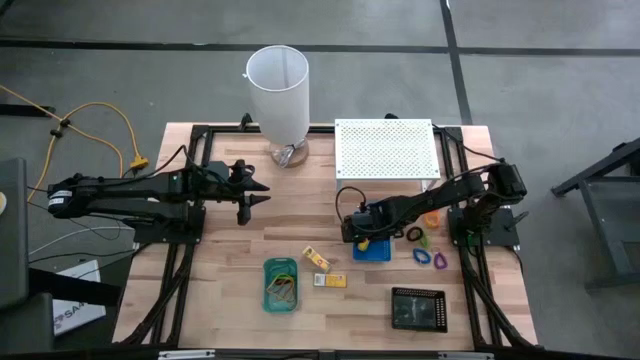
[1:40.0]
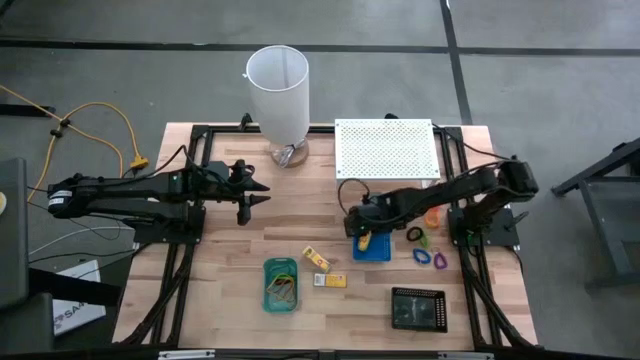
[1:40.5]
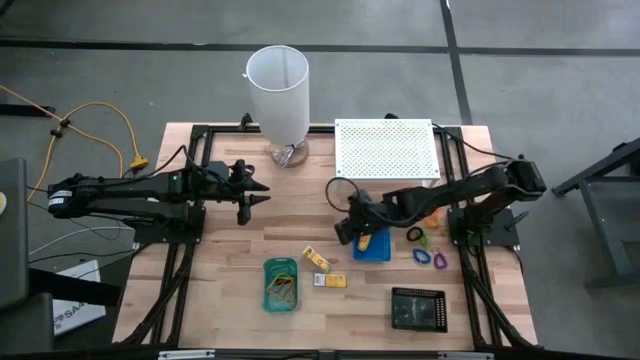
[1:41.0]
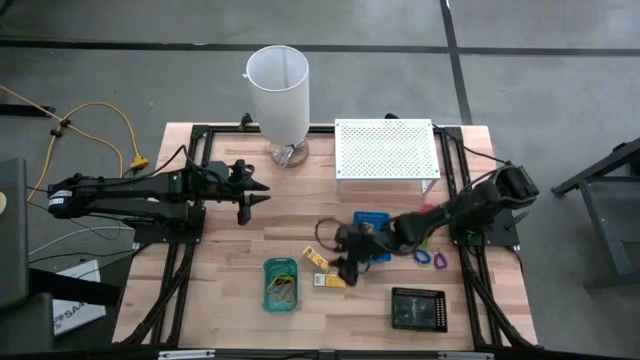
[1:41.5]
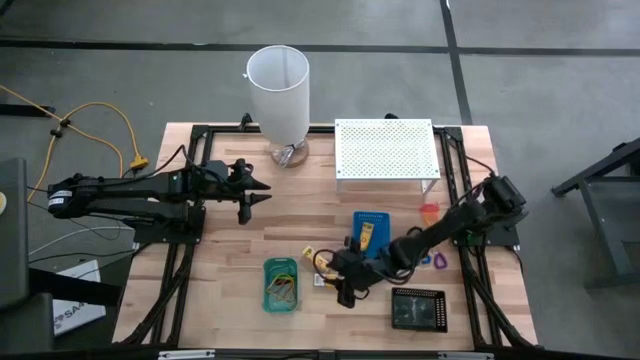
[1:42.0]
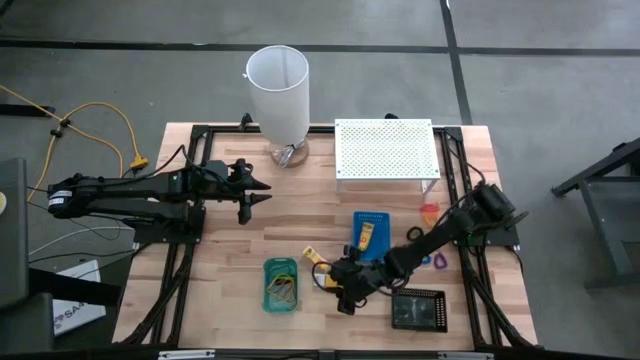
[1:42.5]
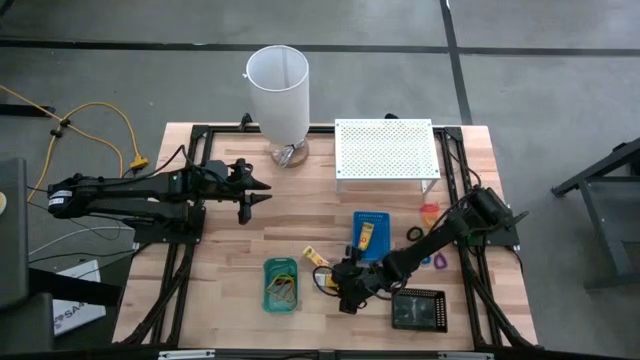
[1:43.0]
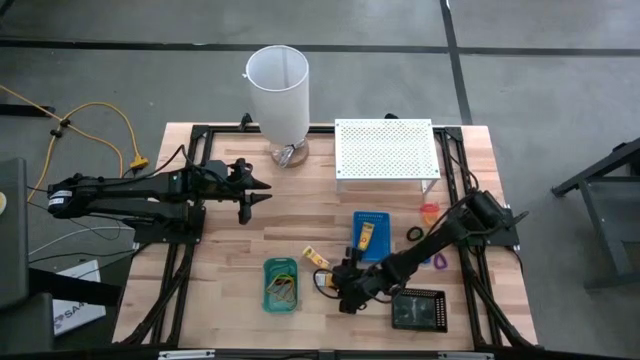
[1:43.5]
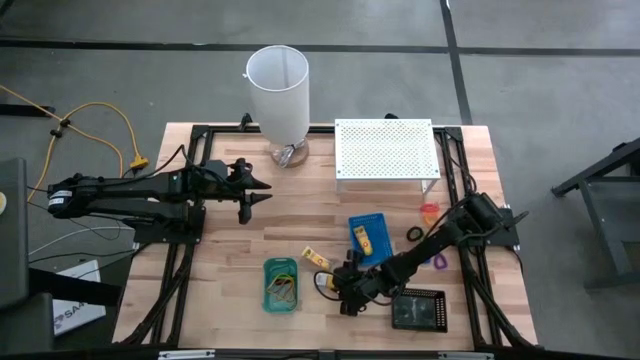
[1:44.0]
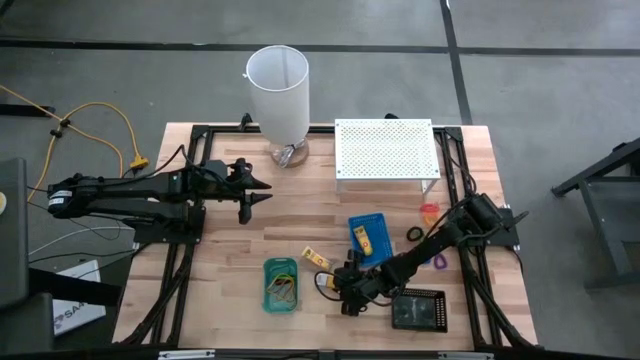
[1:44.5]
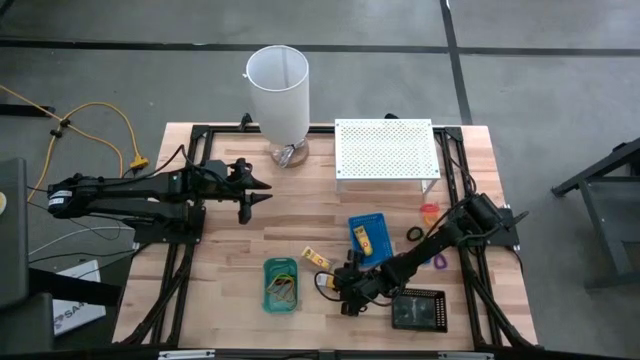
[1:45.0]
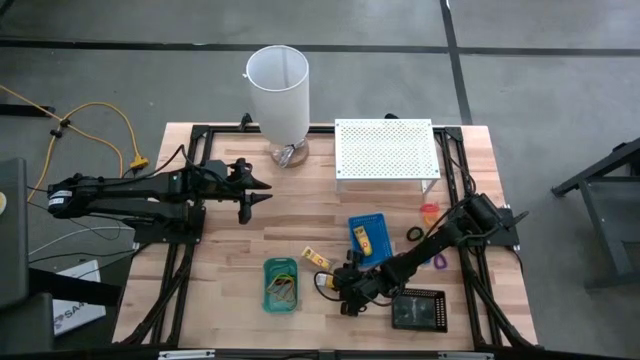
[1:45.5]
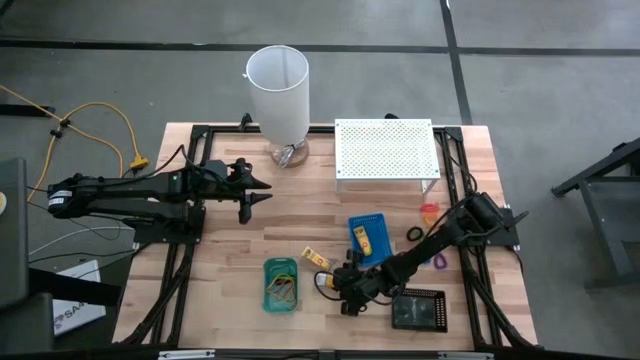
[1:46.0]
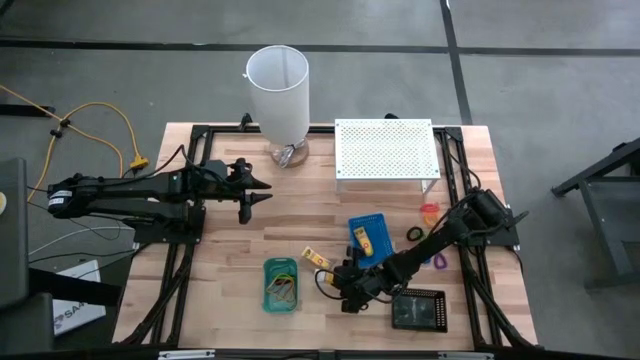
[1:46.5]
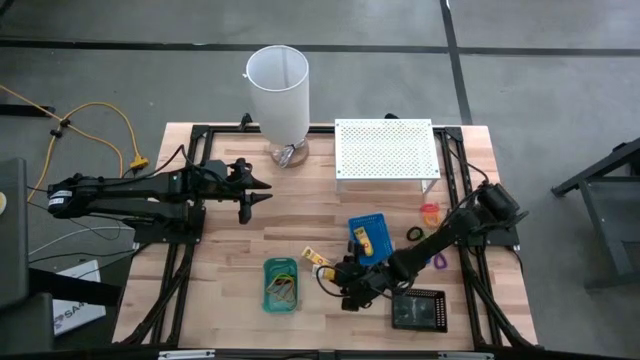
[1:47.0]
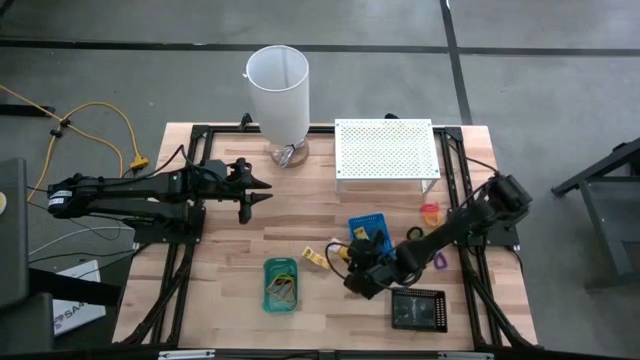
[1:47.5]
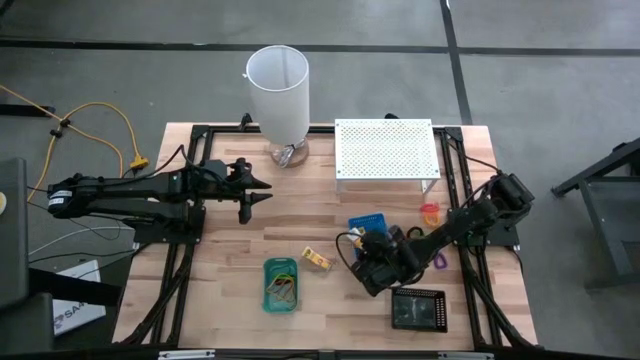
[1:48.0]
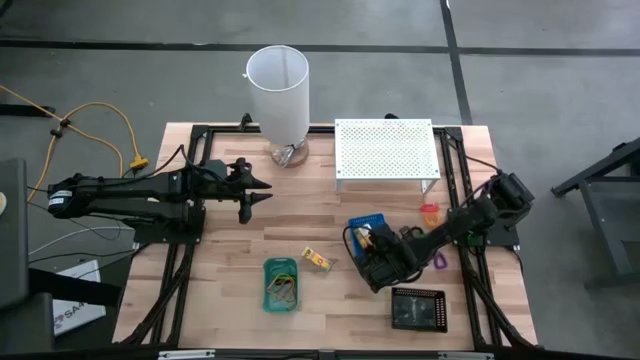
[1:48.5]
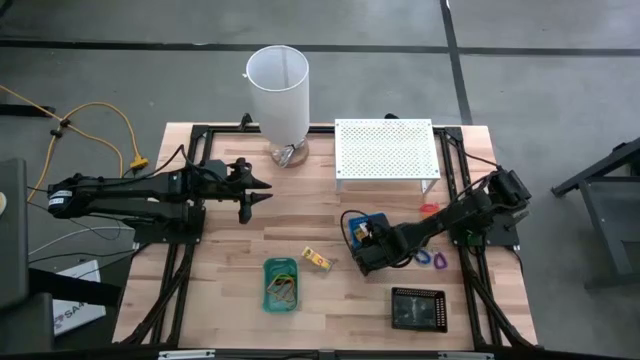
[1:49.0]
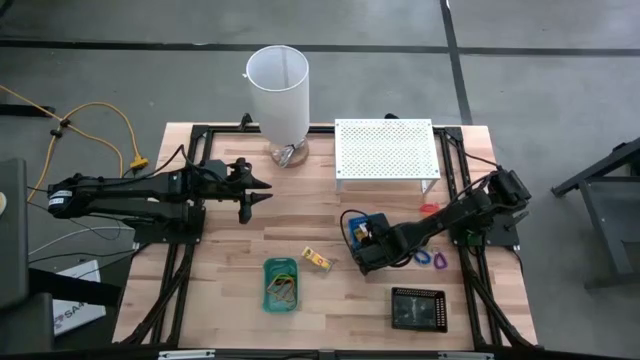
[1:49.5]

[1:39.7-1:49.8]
Task: Pick & Place Office Desk Supplies
Put the bottom crayon box into the blue bin

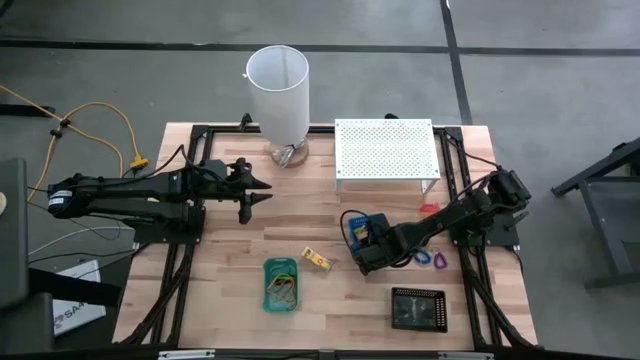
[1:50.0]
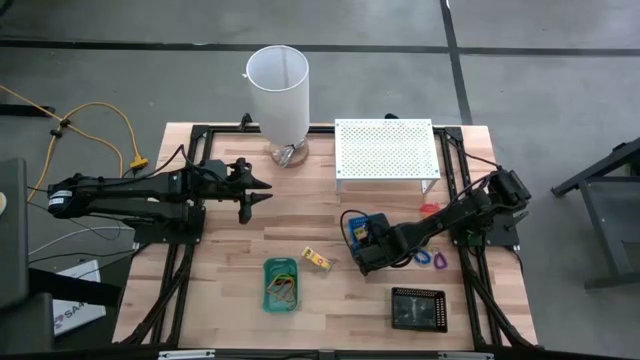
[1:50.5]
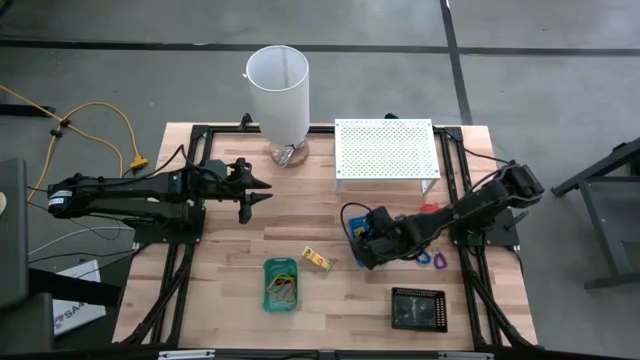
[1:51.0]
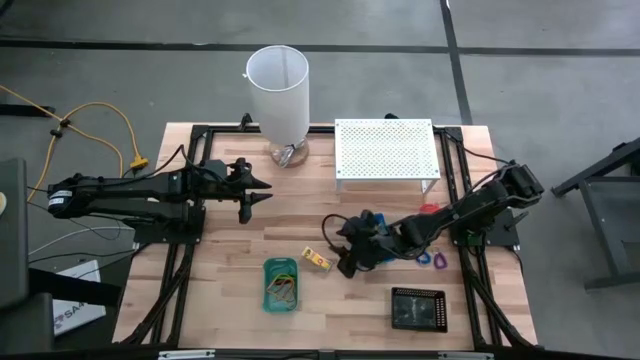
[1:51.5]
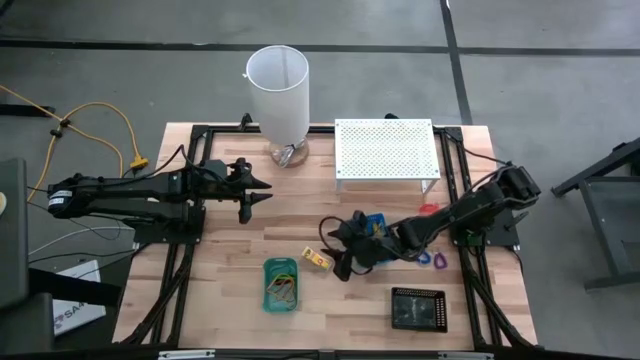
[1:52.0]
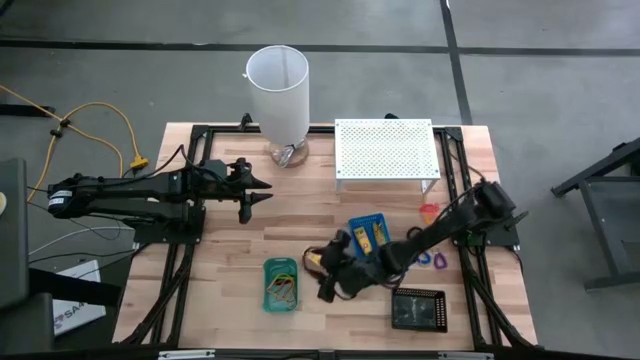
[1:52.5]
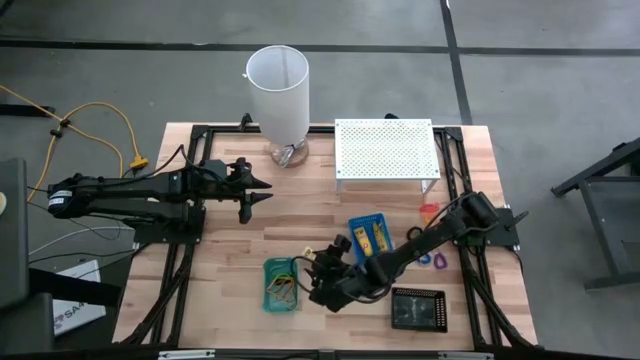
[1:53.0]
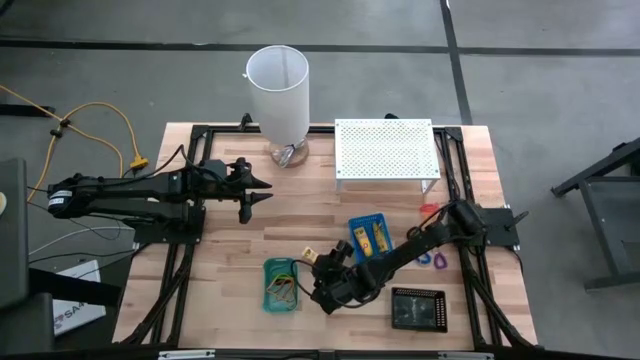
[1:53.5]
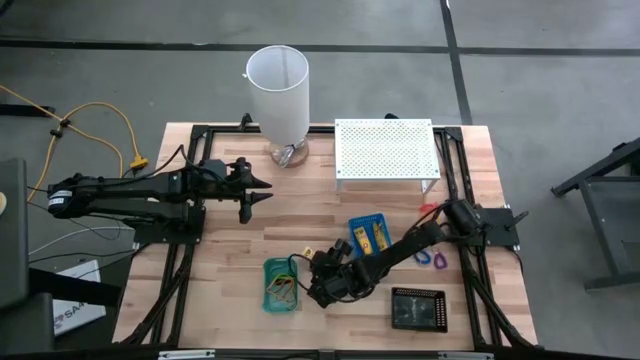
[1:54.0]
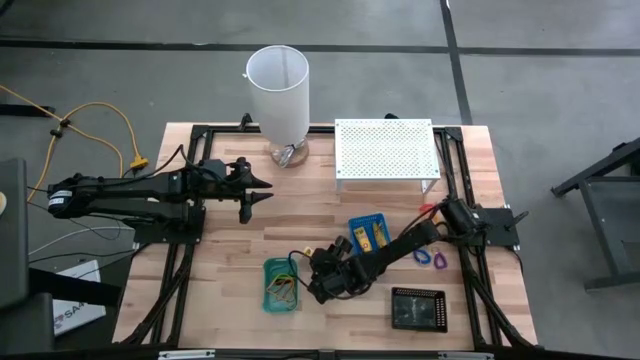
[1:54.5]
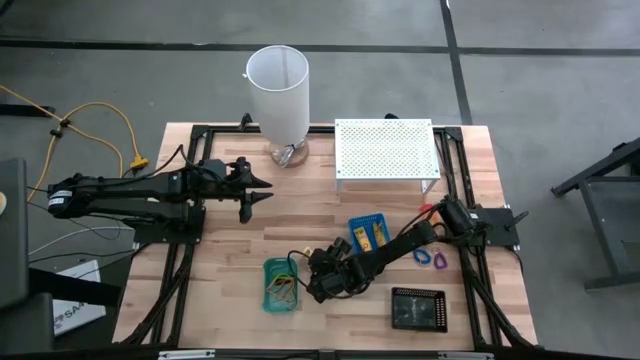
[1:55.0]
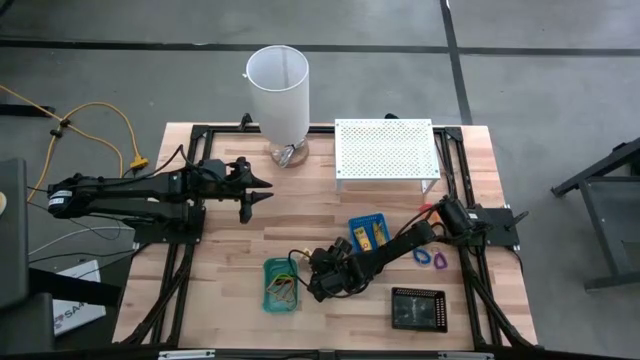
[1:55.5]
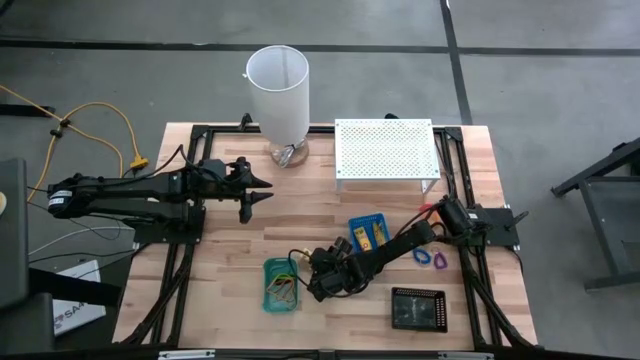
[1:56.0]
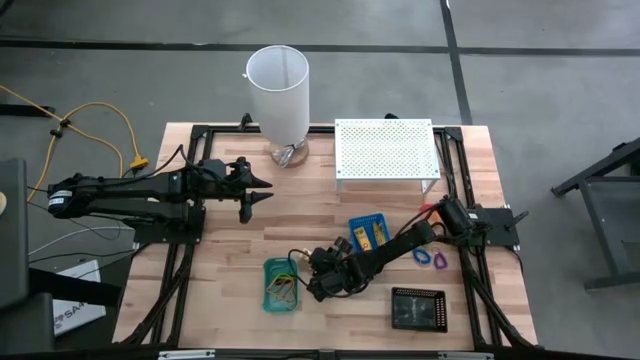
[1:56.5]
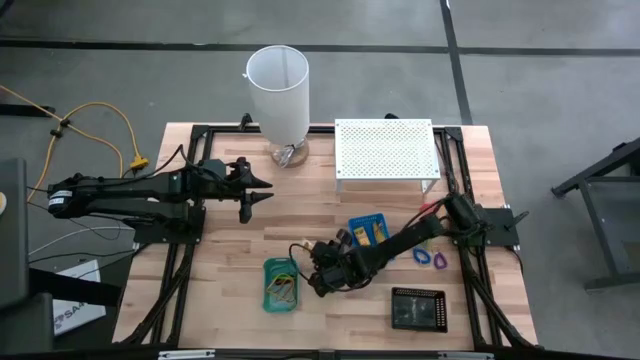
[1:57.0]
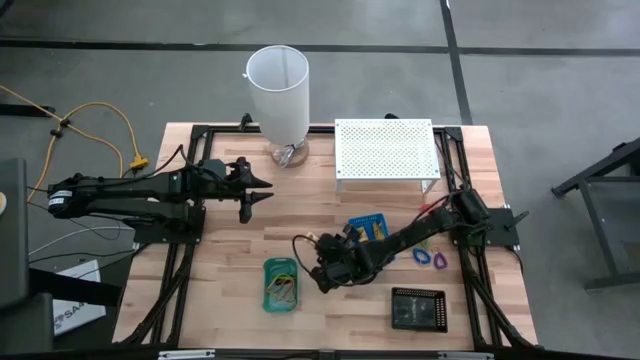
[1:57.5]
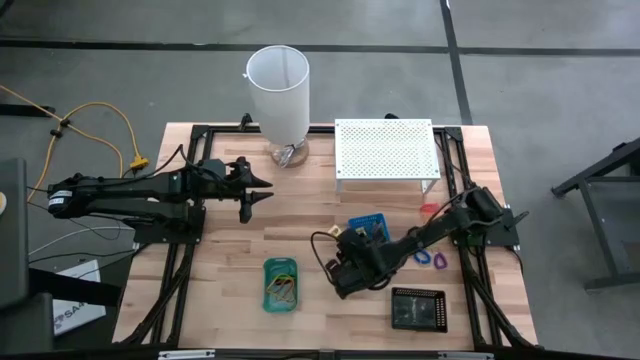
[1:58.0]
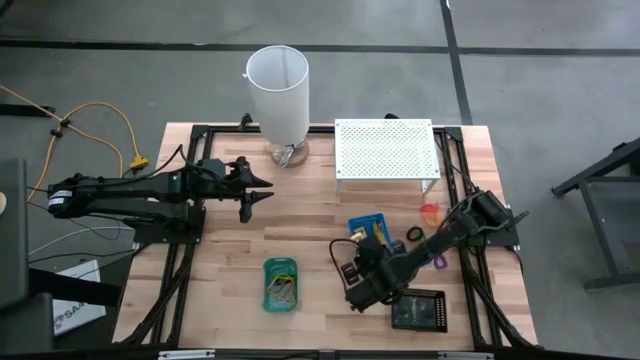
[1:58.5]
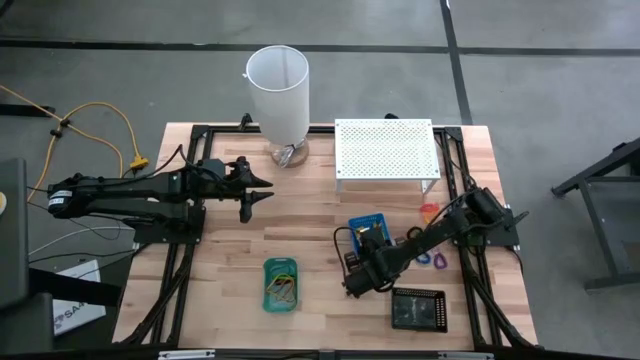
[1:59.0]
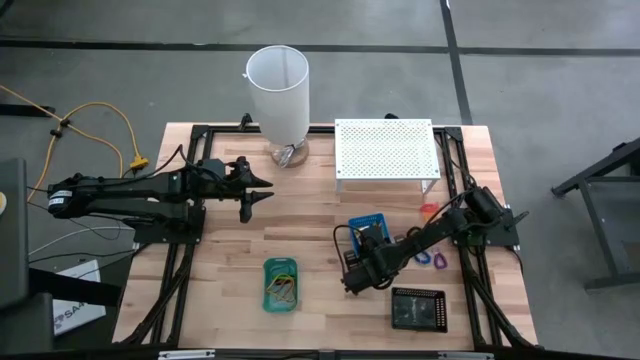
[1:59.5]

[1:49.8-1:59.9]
Put the crayon box into the blue bin

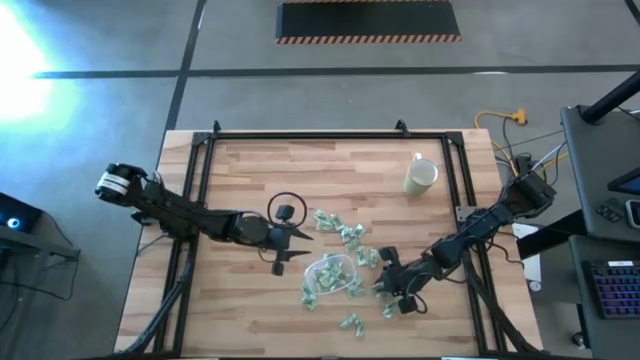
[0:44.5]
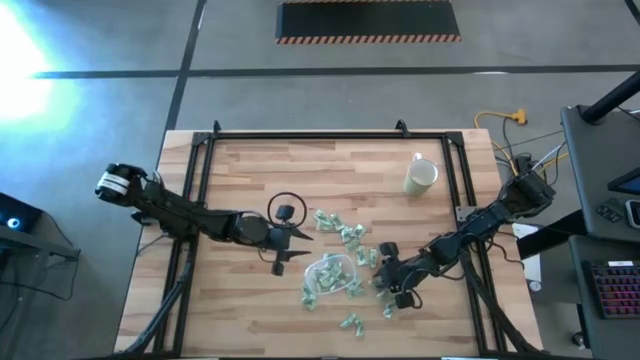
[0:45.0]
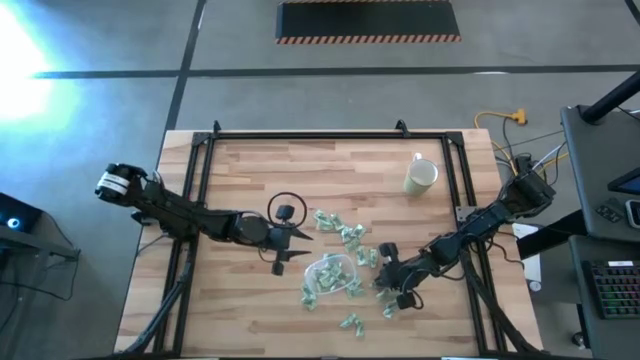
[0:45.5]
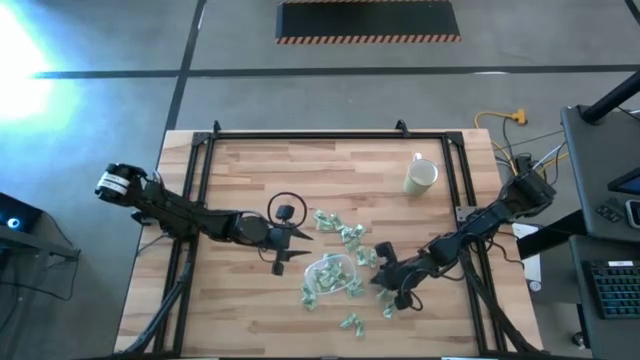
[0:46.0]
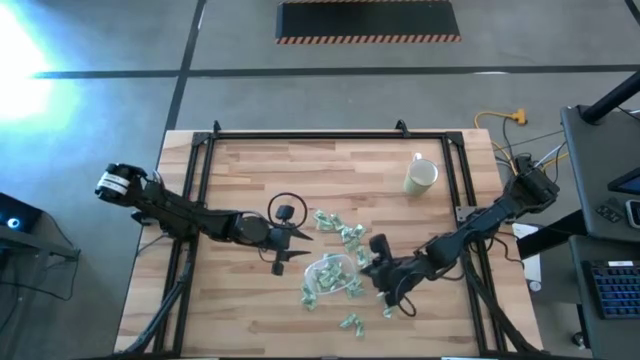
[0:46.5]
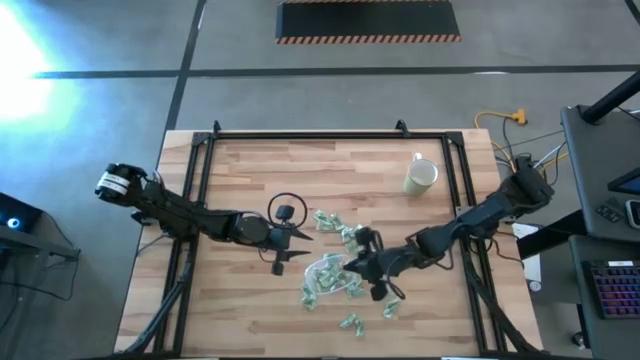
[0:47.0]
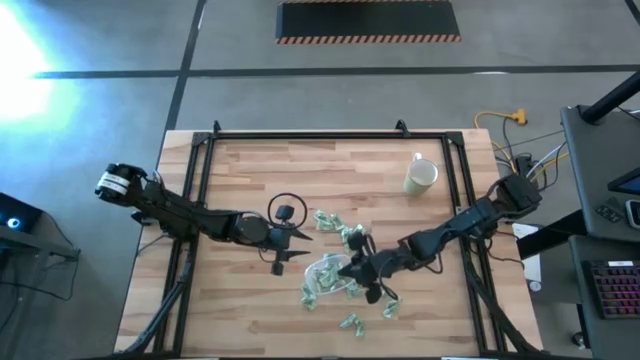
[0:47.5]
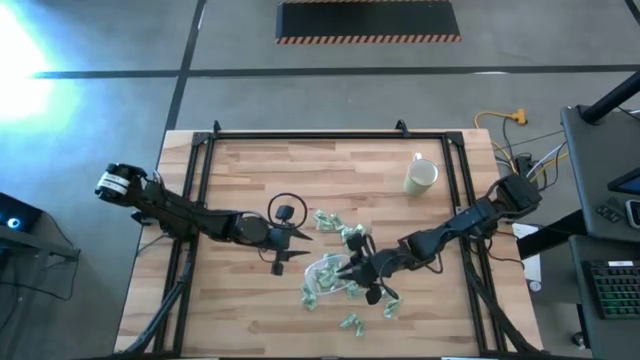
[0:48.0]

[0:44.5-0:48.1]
Task: Pick and place items into bin
Put the Stevia packet into the transparent bin
